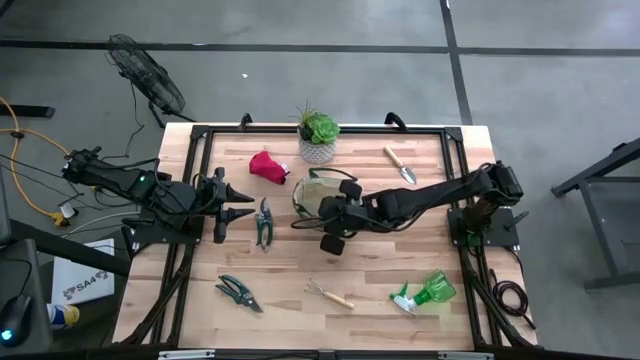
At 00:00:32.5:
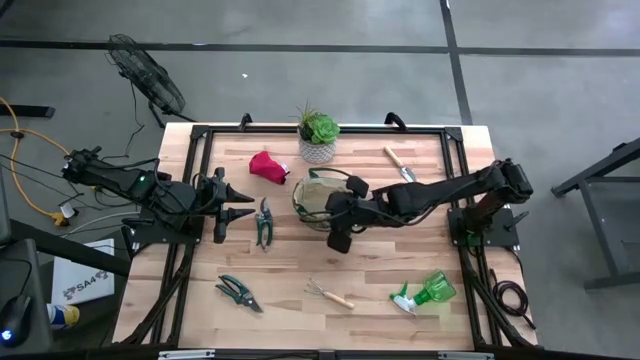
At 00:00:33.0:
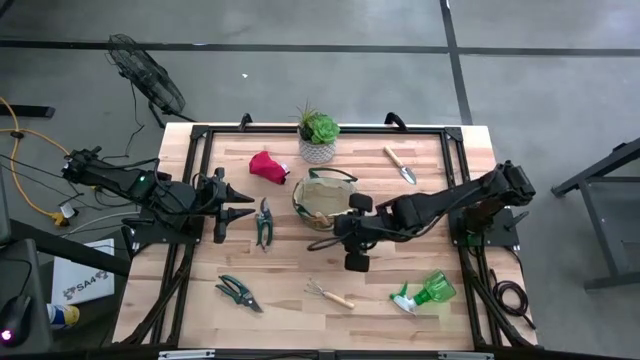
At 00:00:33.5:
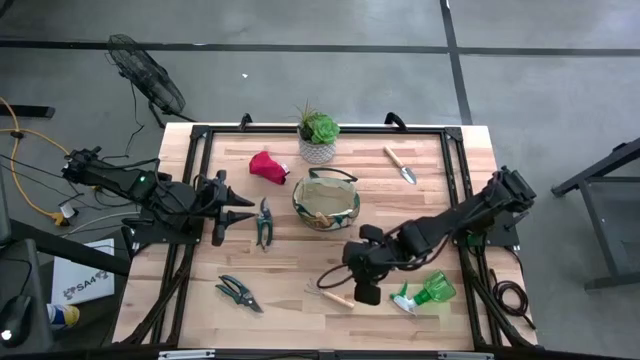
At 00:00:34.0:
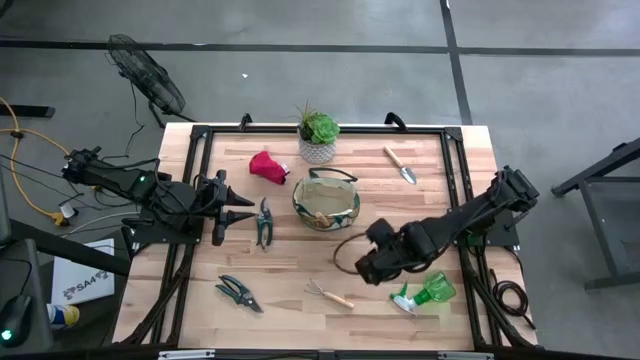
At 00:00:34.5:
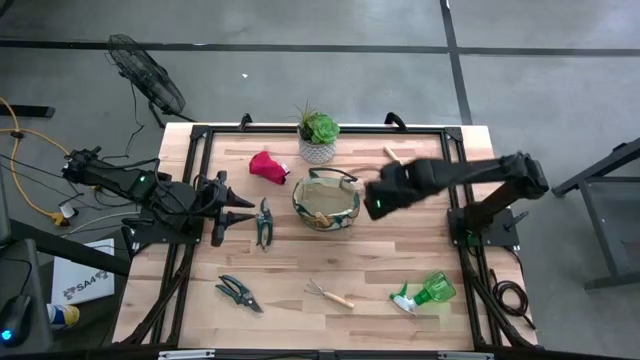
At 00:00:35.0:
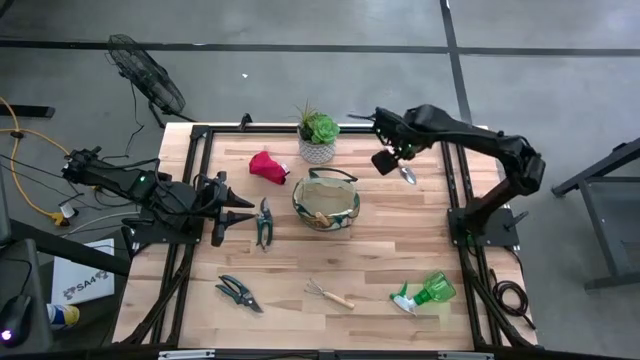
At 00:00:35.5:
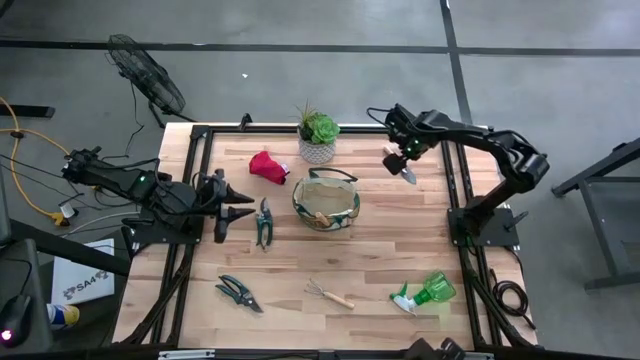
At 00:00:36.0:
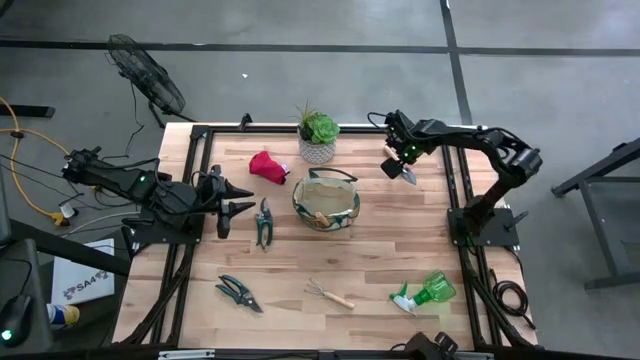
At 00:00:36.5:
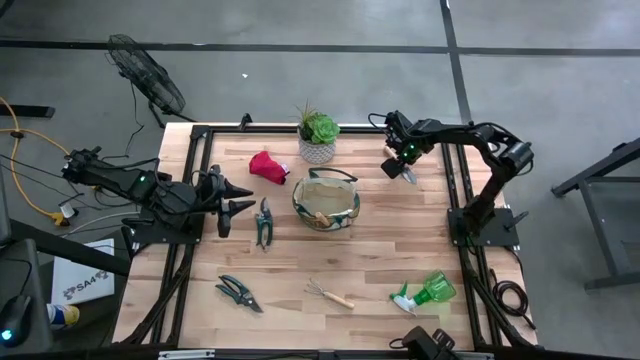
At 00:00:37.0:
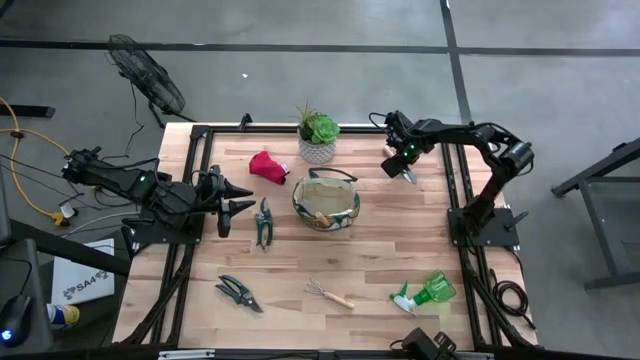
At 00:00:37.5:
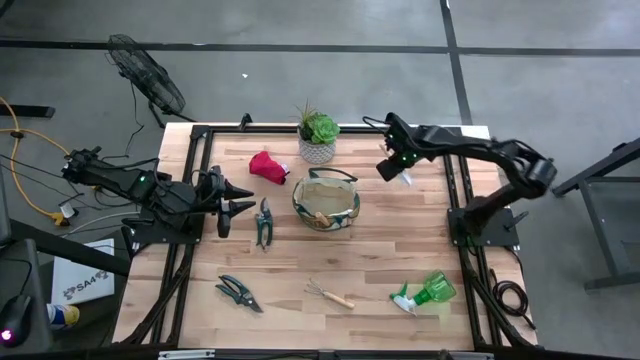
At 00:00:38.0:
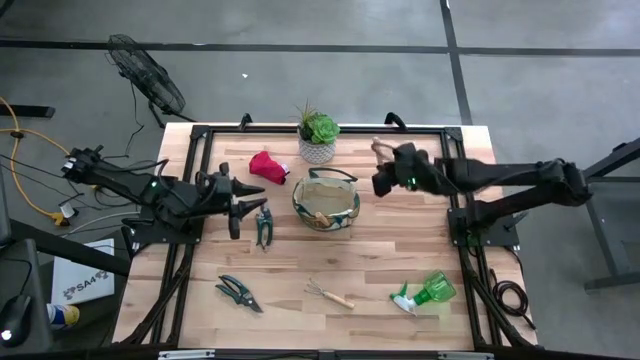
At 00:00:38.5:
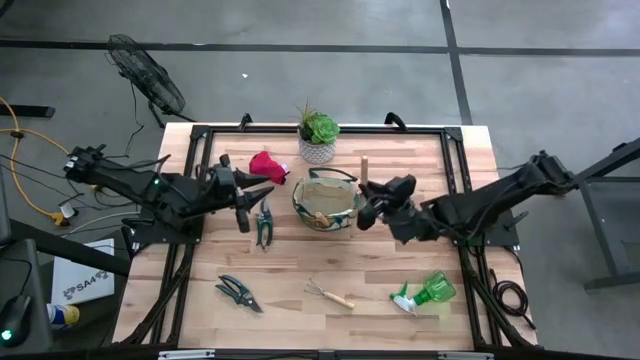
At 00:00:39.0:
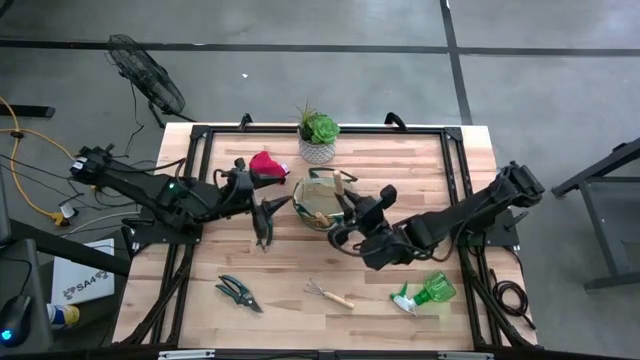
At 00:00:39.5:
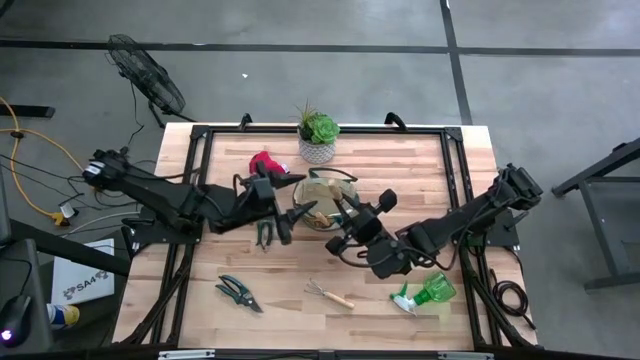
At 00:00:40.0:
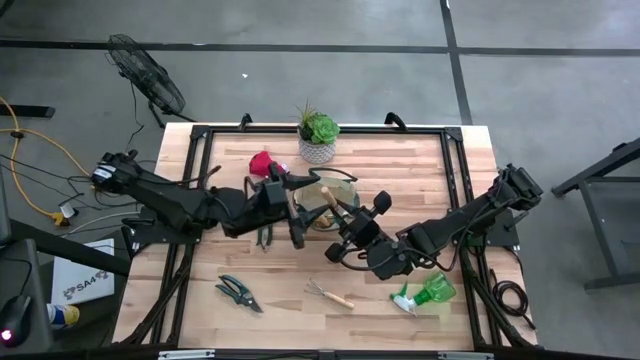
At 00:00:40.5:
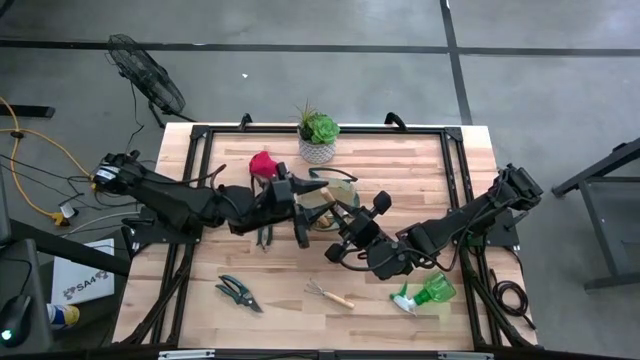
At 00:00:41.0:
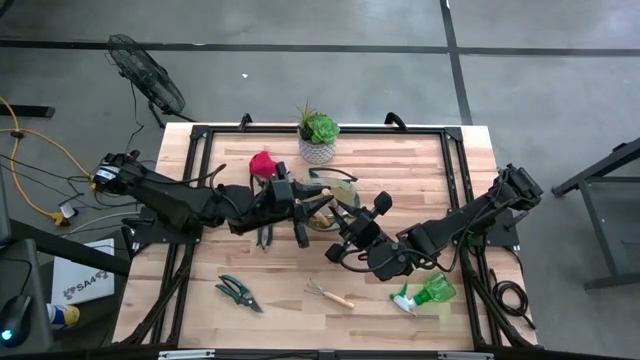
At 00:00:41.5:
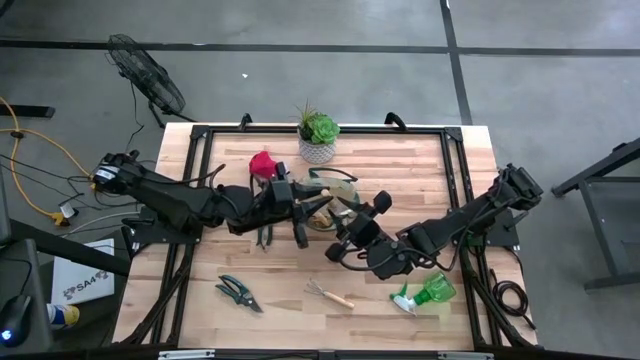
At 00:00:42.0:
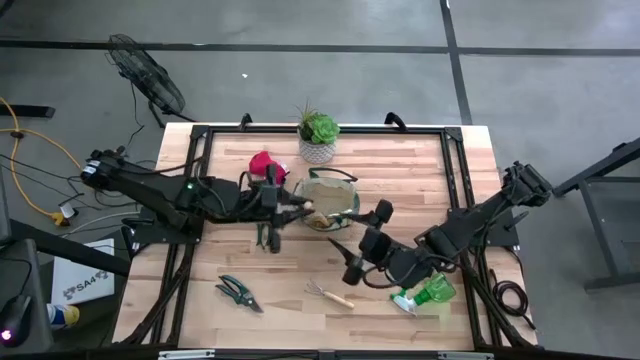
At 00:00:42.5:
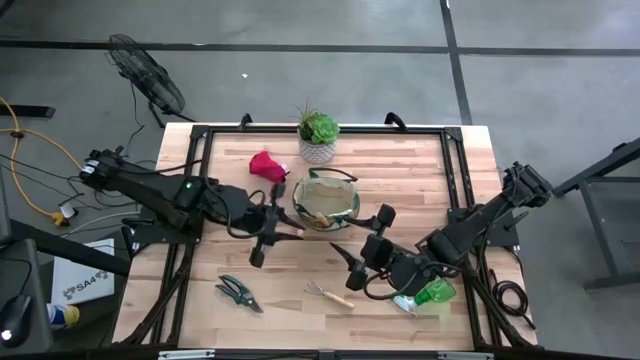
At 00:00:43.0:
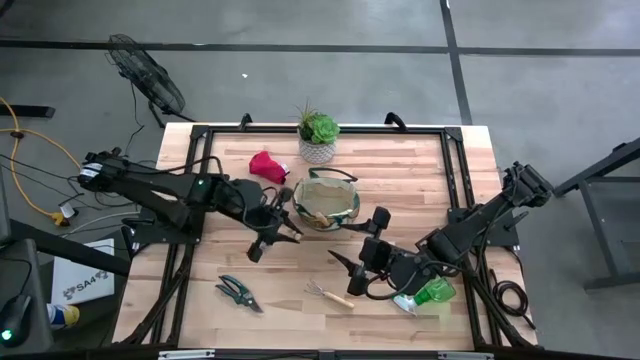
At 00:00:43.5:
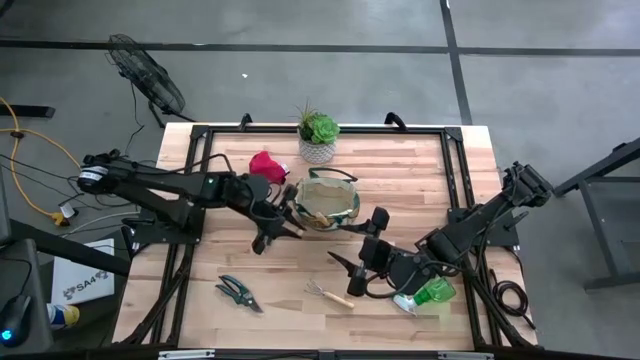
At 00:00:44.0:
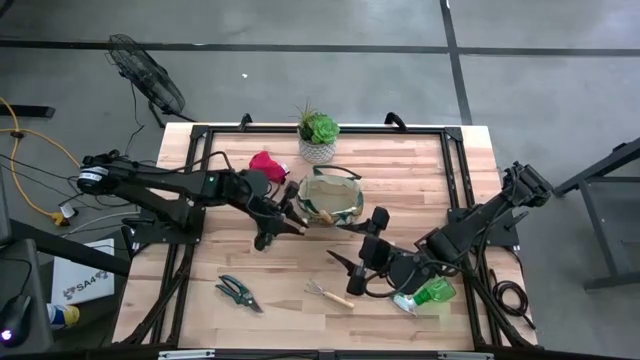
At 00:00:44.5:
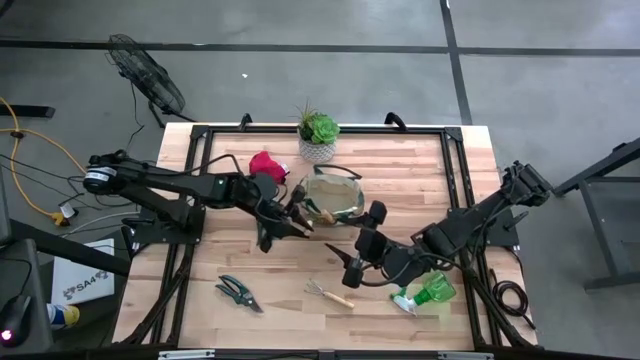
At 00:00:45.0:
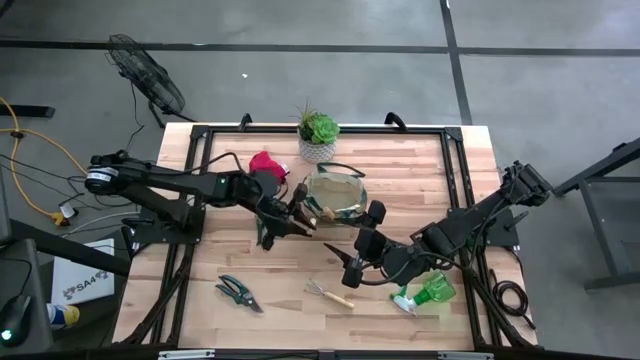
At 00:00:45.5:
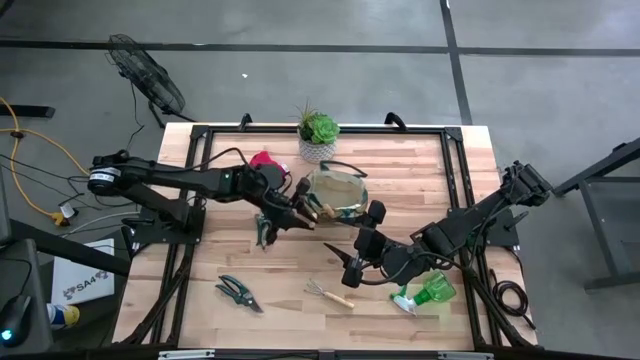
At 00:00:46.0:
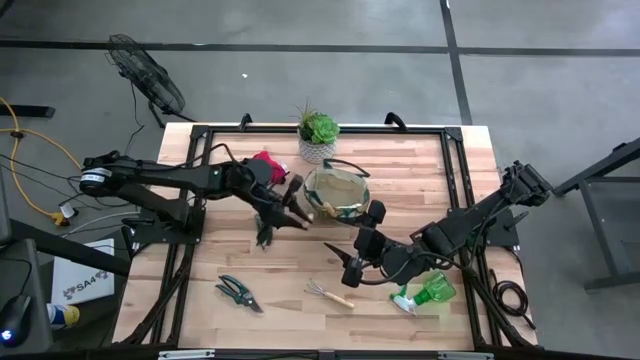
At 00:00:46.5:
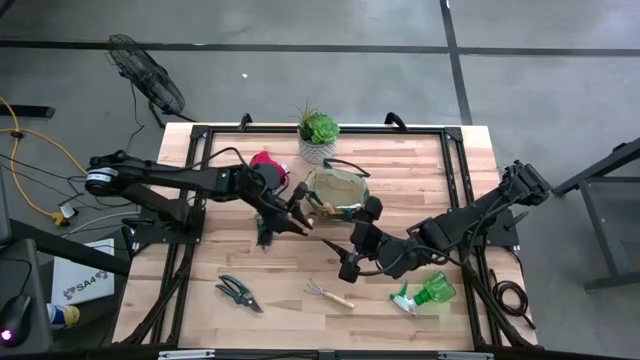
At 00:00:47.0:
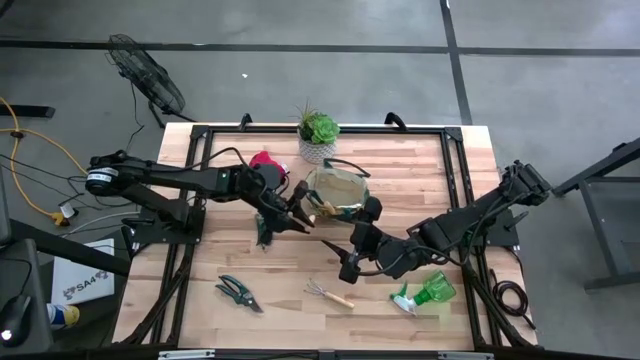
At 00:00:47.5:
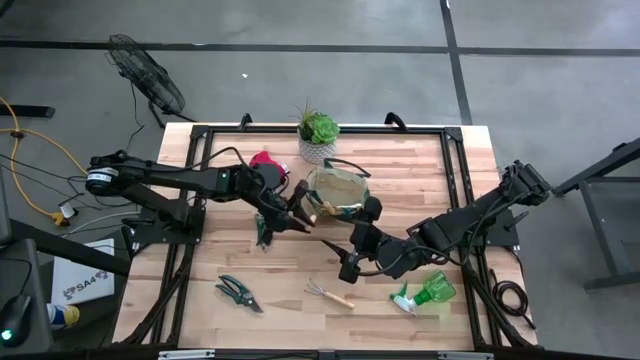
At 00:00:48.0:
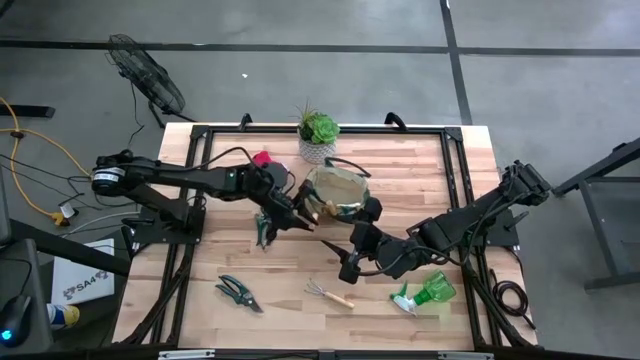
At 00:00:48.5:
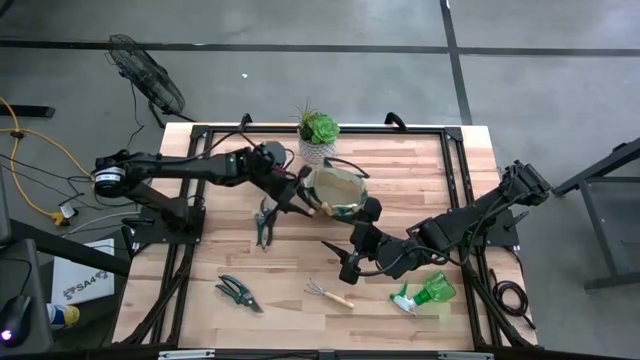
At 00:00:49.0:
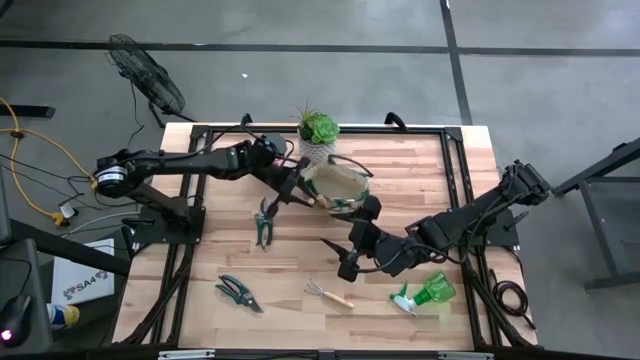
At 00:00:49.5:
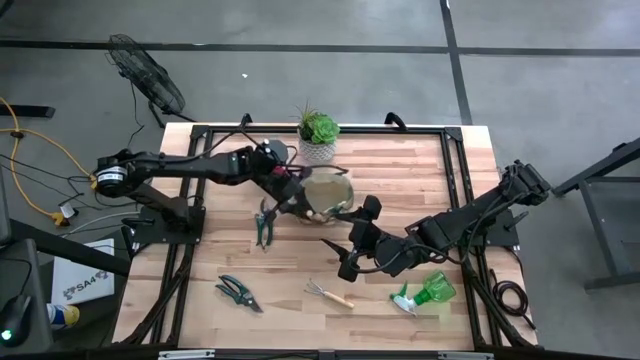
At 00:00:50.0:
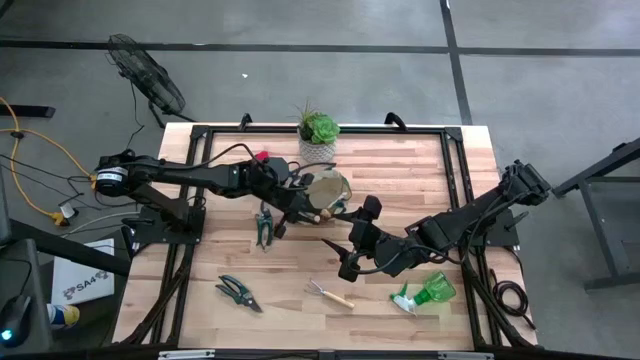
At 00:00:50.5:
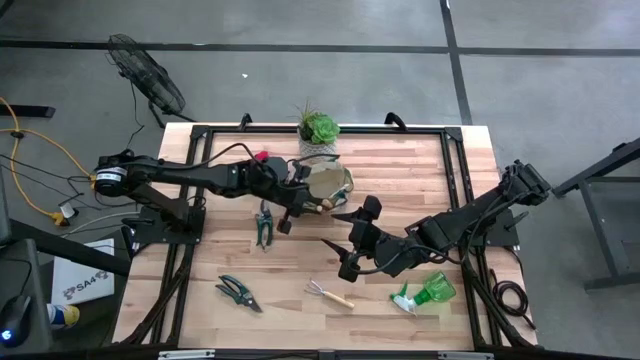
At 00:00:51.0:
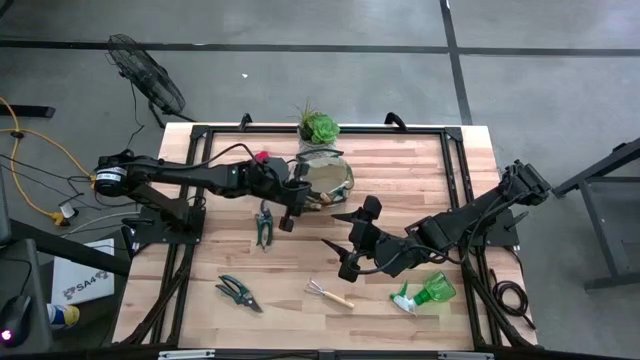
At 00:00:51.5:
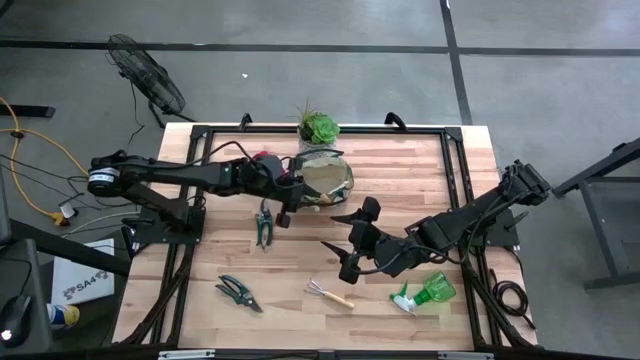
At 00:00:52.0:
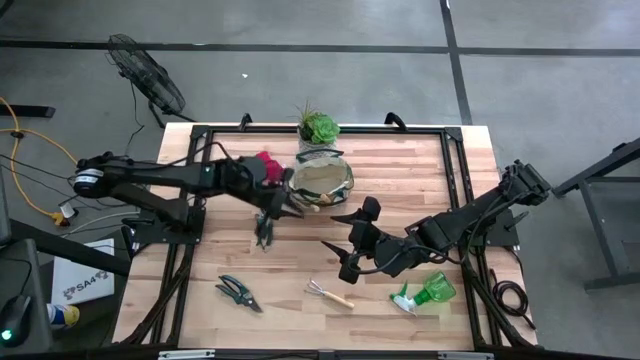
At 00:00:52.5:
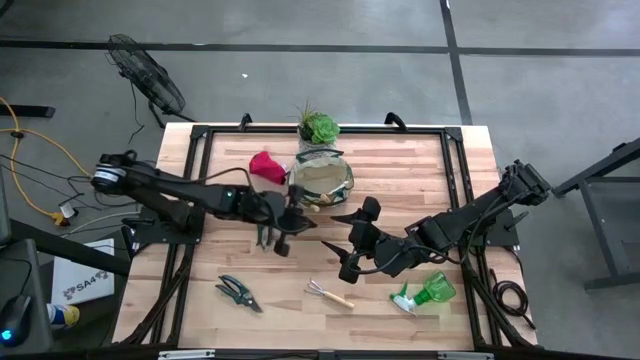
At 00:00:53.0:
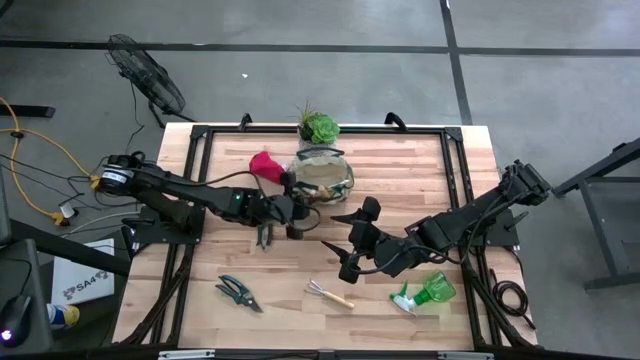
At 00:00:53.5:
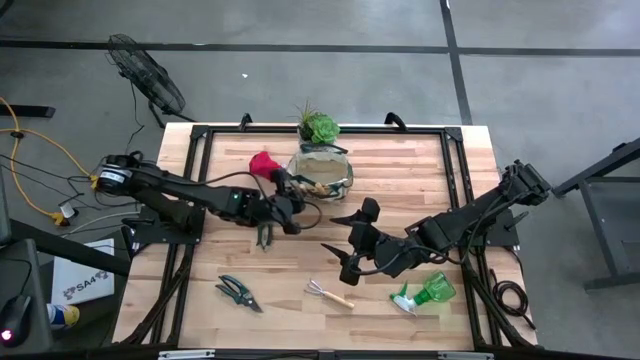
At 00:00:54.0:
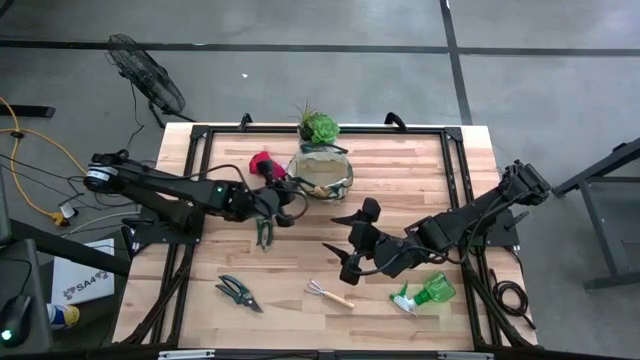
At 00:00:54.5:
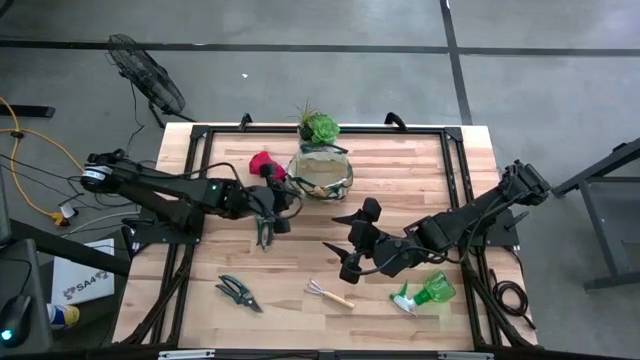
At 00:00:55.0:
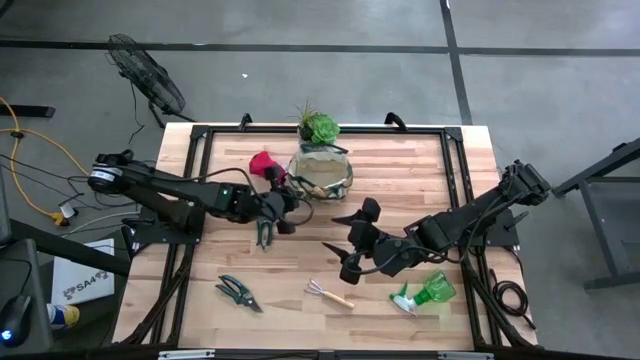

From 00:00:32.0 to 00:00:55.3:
Task: Pick & Place Garden tools in Gardening bag
Put the brown trowel into the gardening bag
